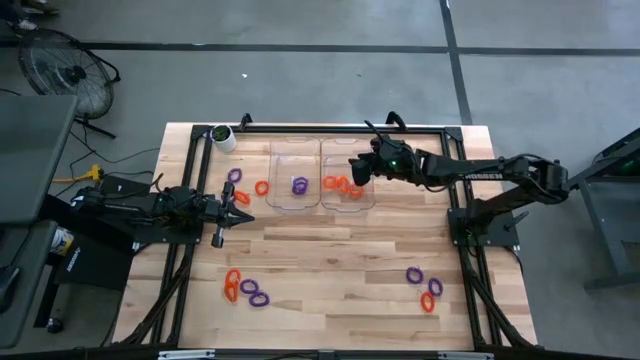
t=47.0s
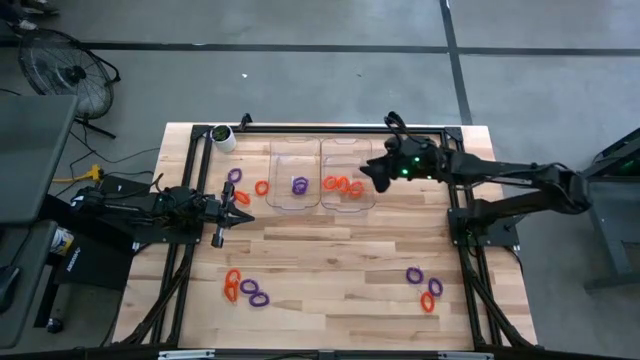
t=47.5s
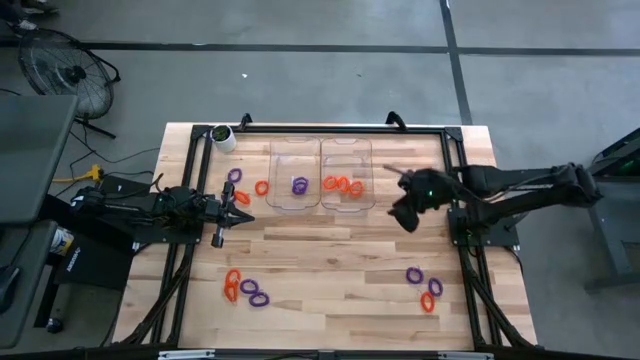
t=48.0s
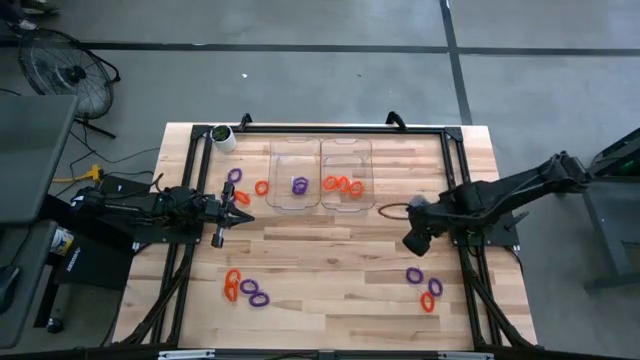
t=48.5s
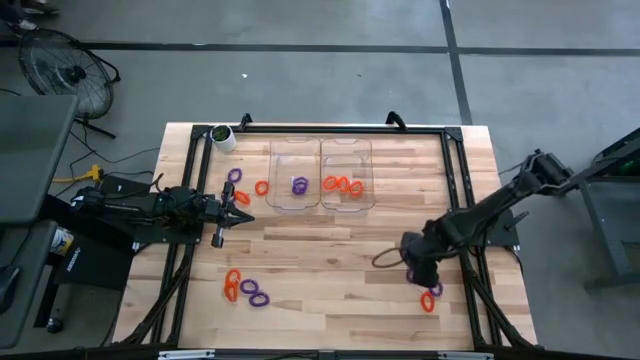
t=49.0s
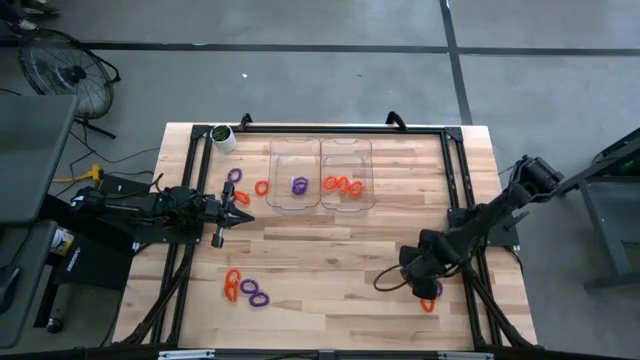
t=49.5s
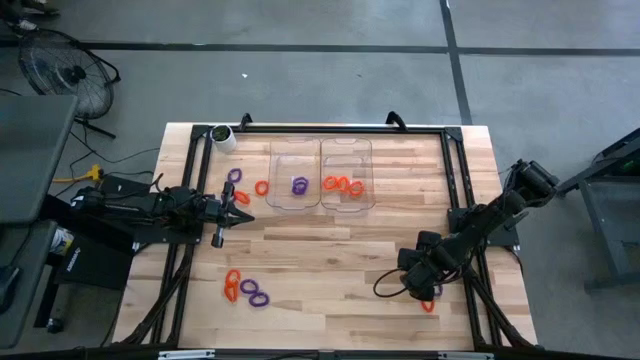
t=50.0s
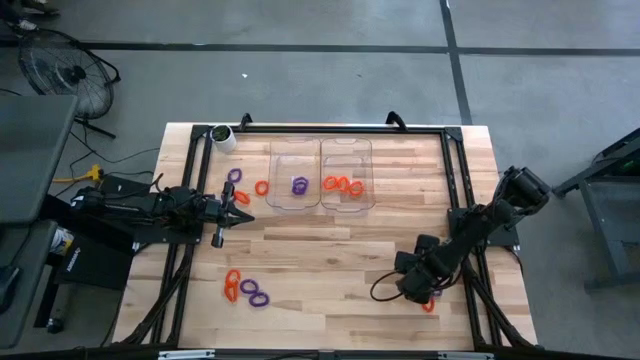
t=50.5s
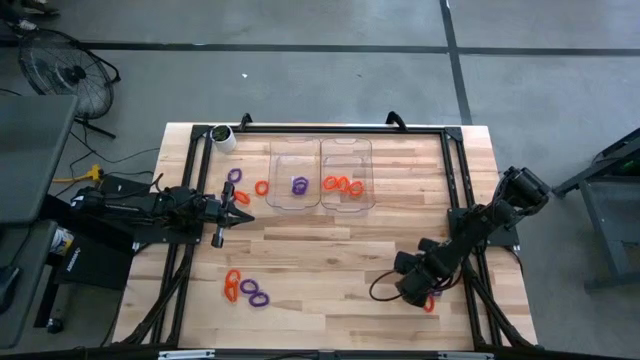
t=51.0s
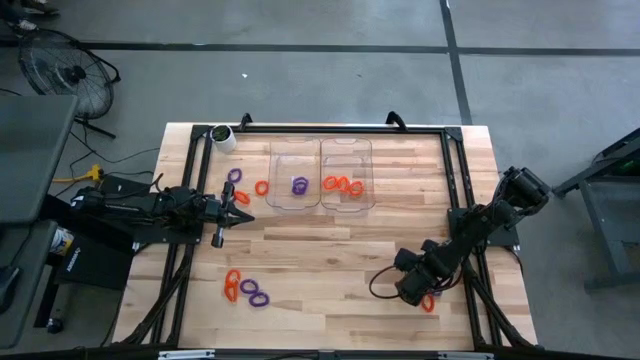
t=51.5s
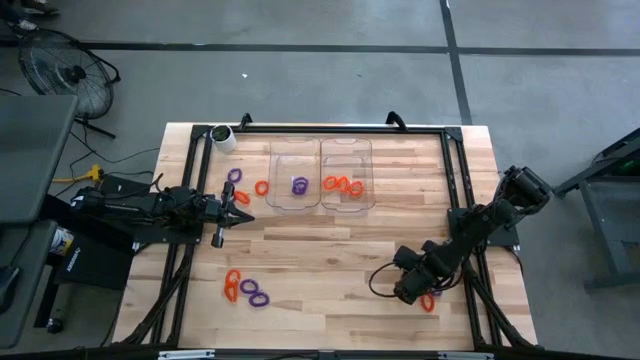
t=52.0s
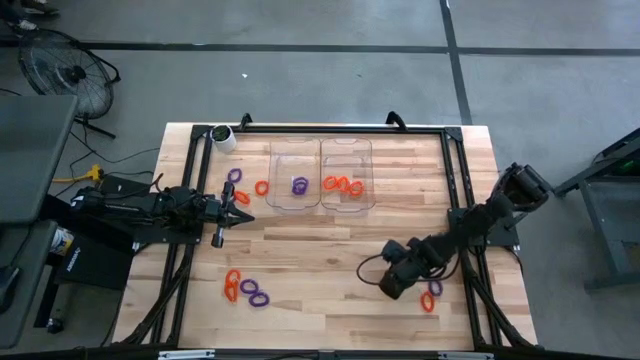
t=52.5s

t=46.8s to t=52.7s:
Task: Sort spring keychains
Put the purple spring keychain into the left transparent bin

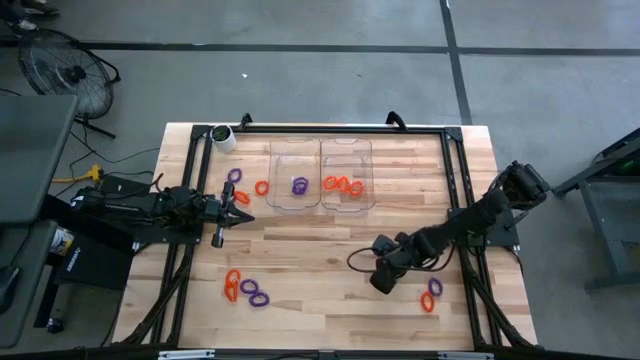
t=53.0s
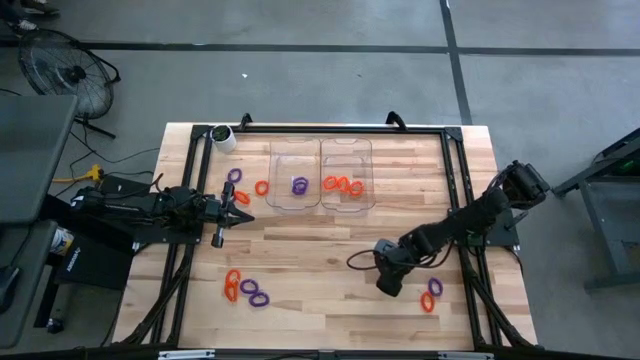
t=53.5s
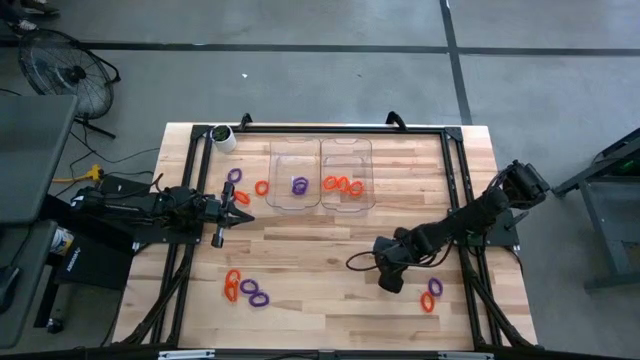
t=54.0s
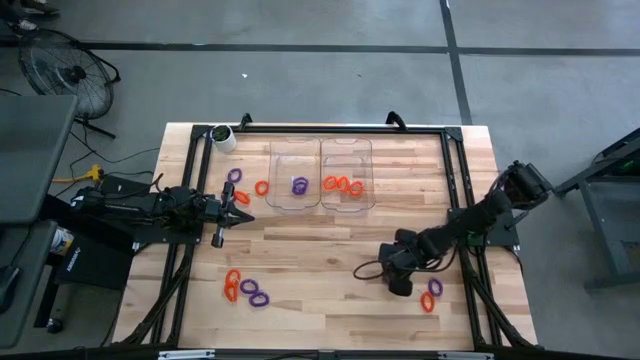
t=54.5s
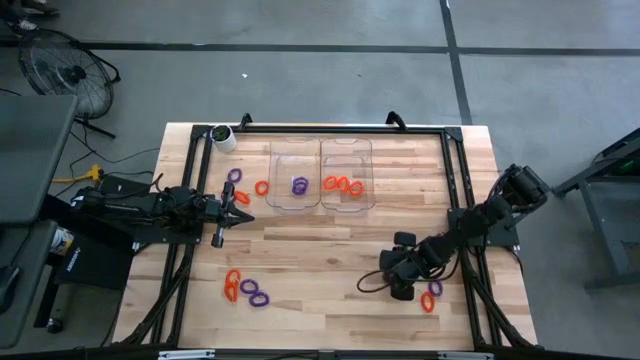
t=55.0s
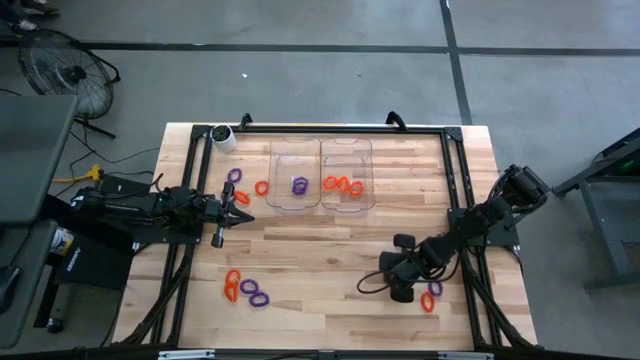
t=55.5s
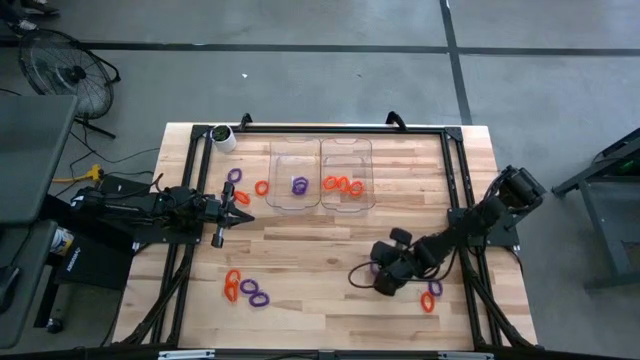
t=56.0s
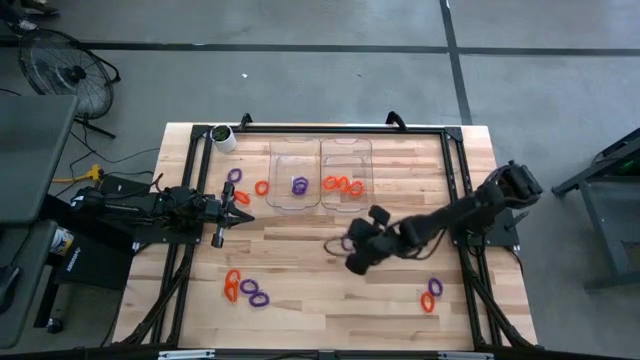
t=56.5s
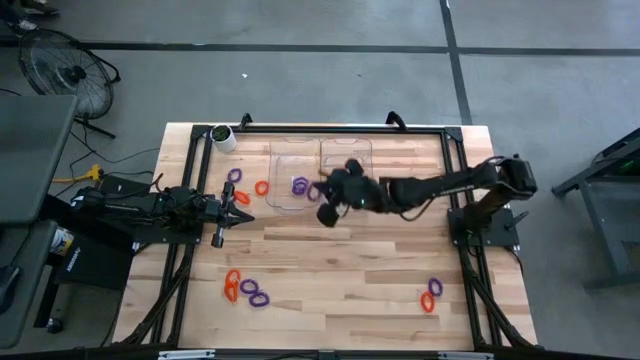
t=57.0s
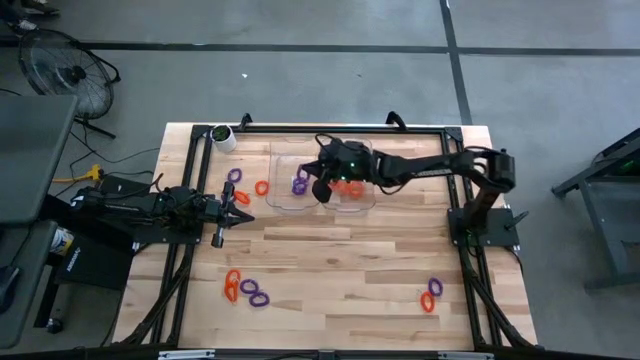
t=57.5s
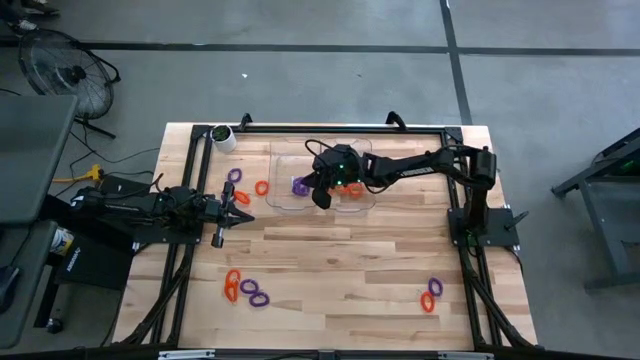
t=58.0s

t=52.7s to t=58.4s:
Put the purple spring keychain into the left transparent bin

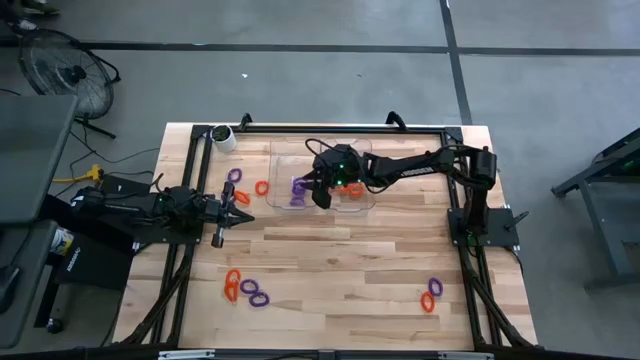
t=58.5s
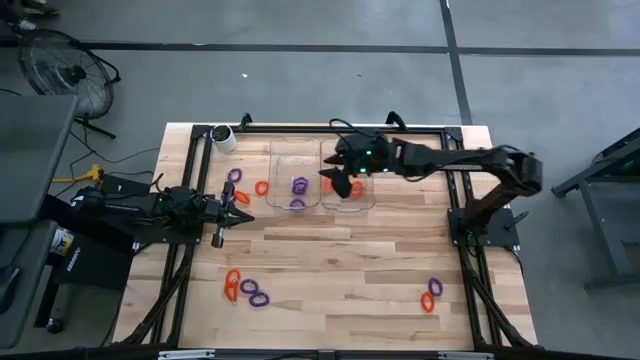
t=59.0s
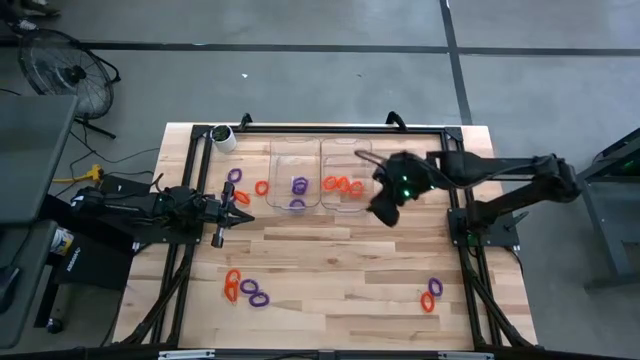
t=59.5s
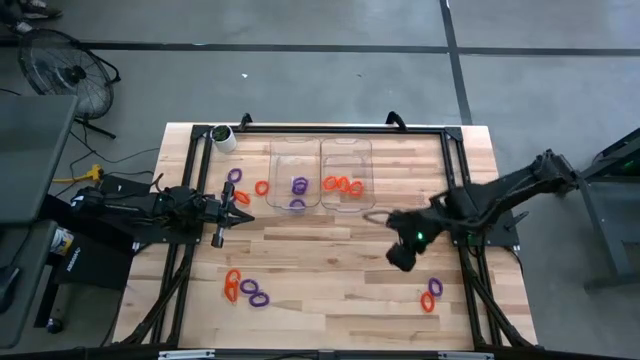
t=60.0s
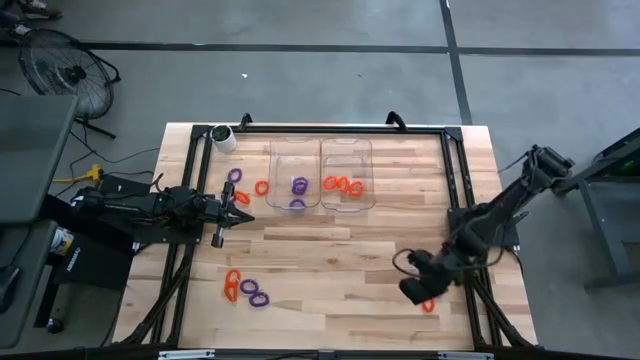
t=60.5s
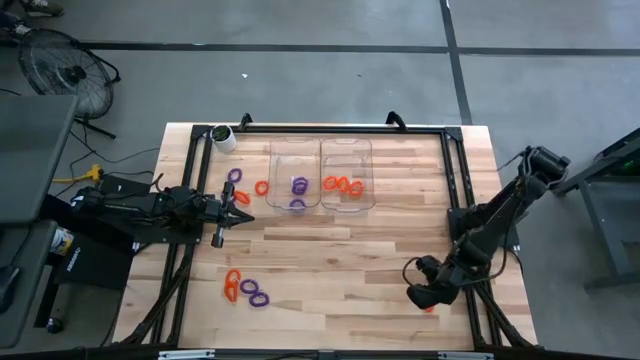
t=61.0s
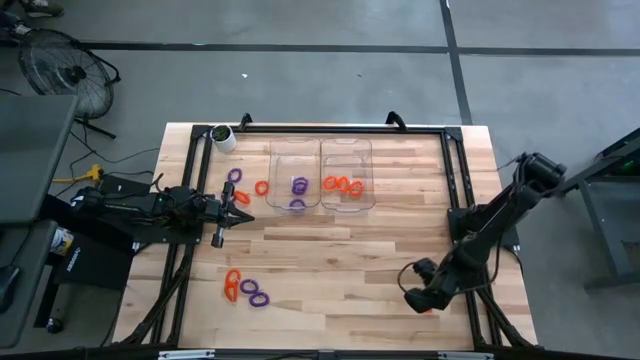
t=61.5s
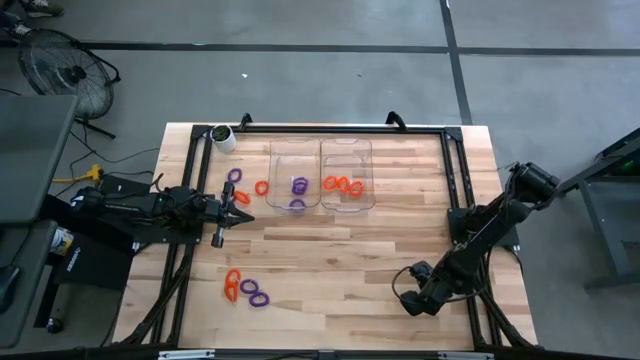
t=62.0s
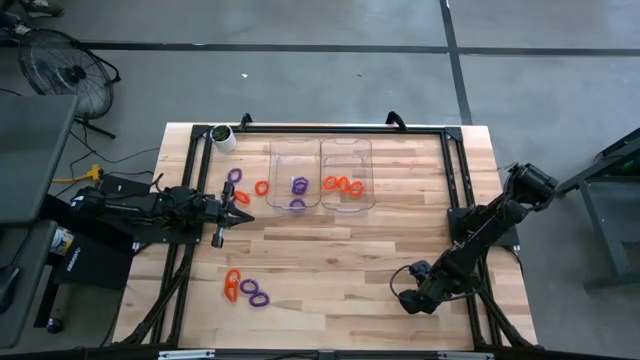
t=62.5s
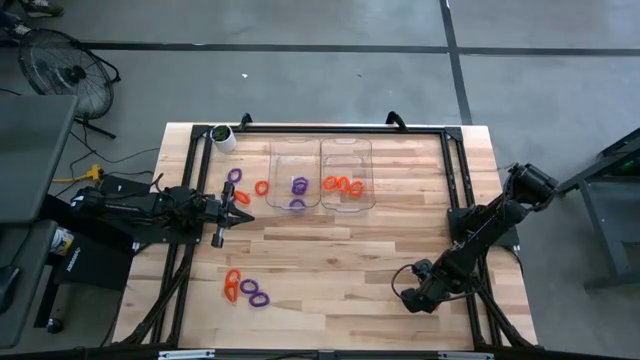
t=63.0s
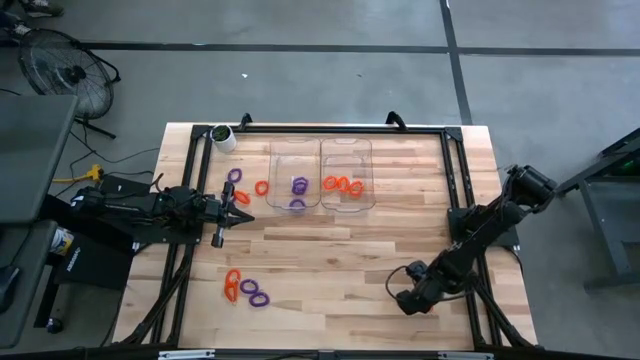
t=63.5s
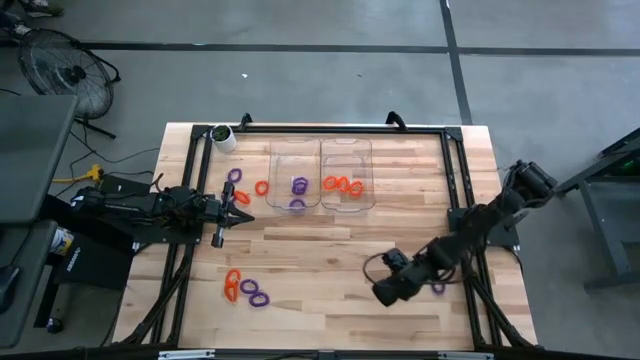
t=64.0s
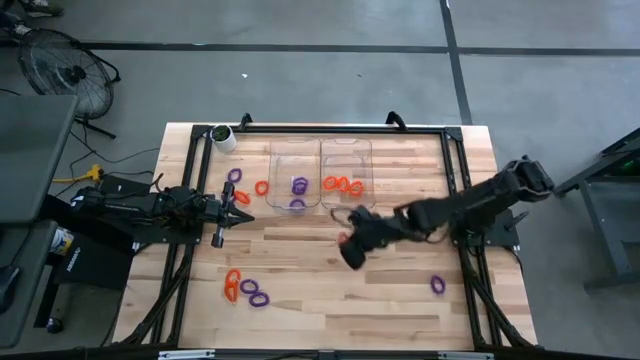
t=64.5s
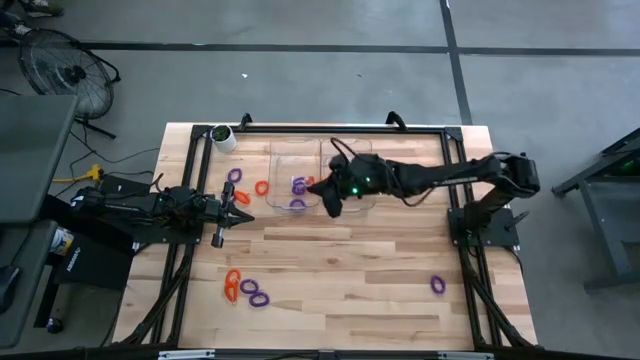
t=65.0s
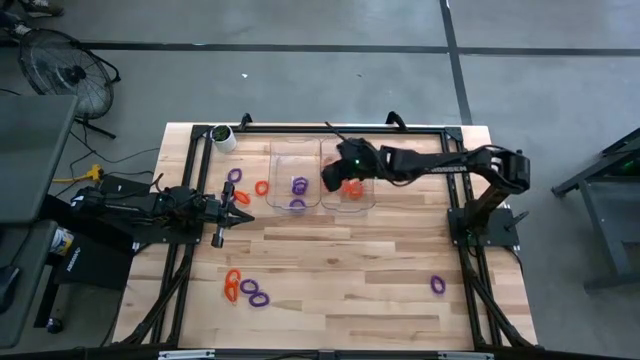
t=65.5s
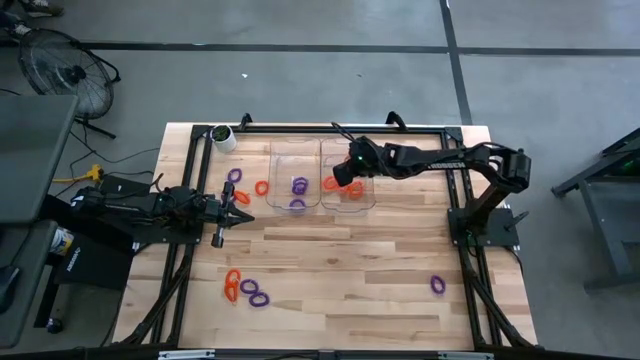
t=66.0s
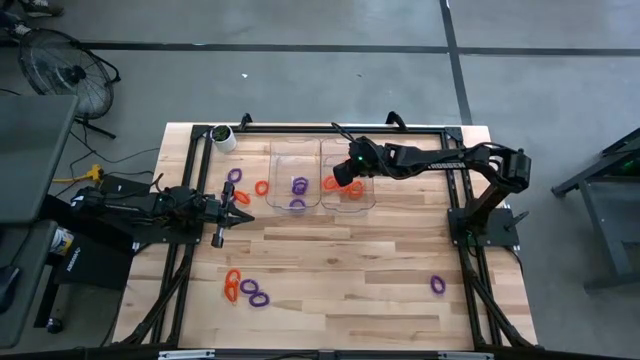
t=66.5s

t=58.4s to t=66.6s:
Put the orange spring keychain into the right transparent bin

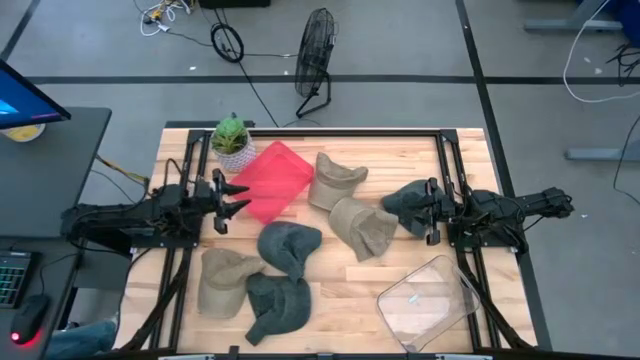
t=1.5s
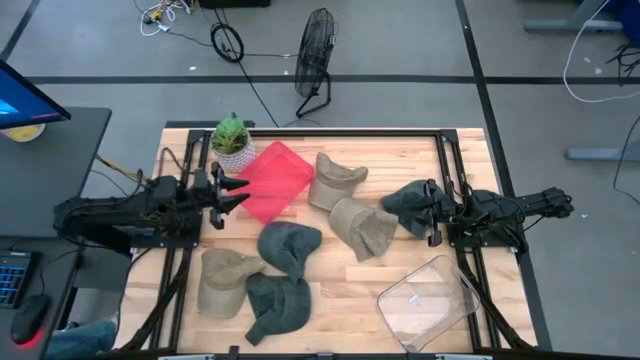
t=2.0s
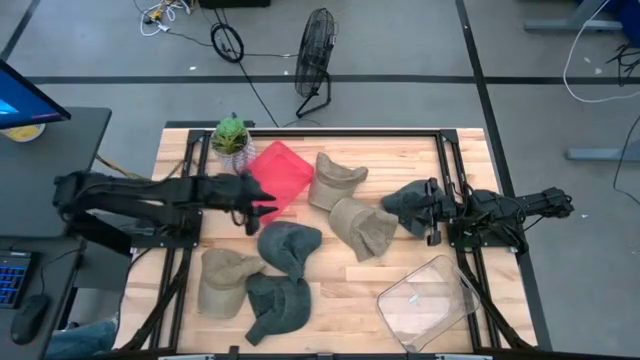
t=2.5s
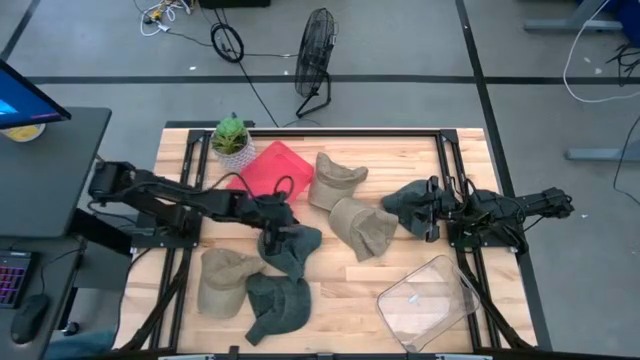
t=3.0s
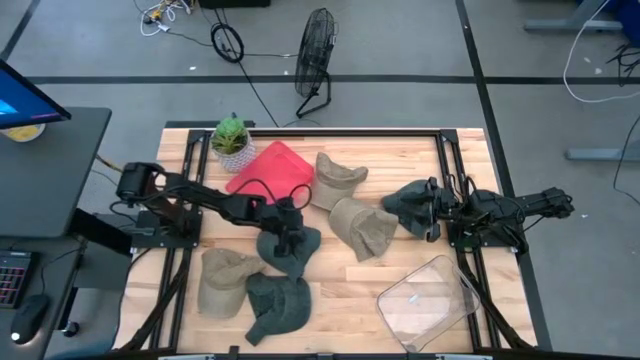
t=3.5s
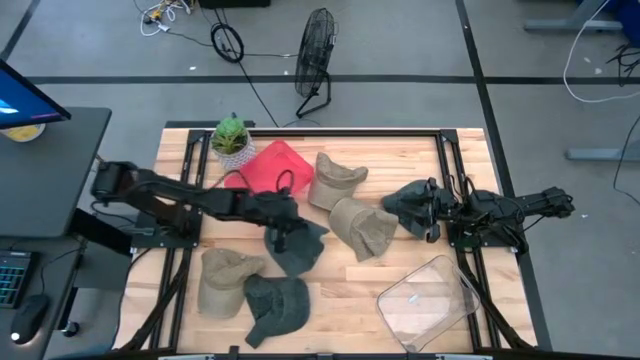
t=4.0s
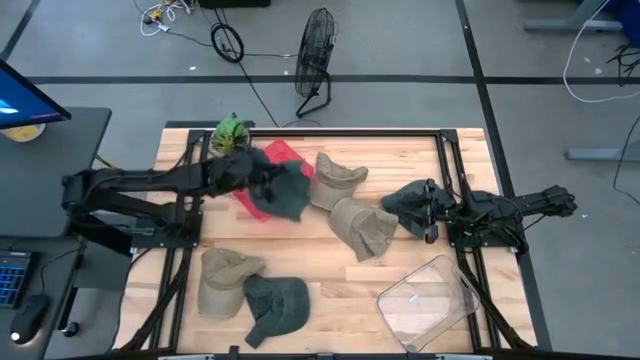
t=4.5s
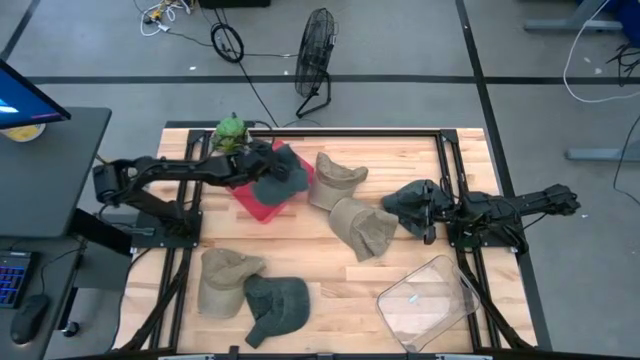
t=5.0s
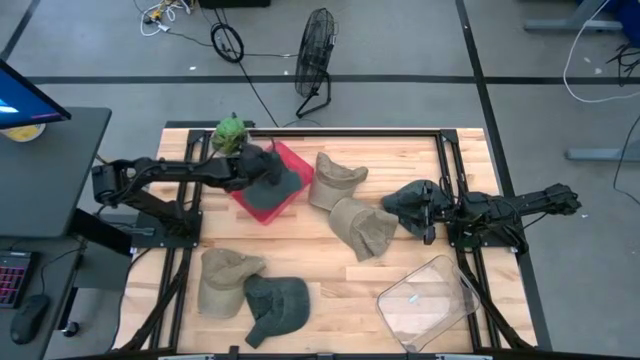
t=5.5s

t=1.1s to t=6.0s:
Task: Pick & Place hat
Put the middle left black cap into the red bin
